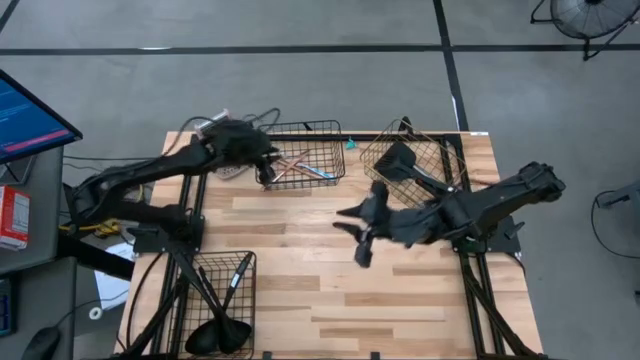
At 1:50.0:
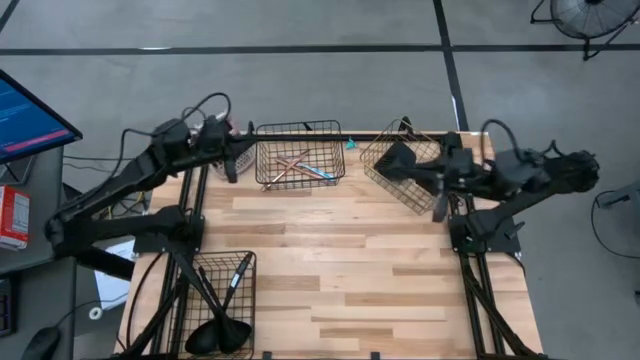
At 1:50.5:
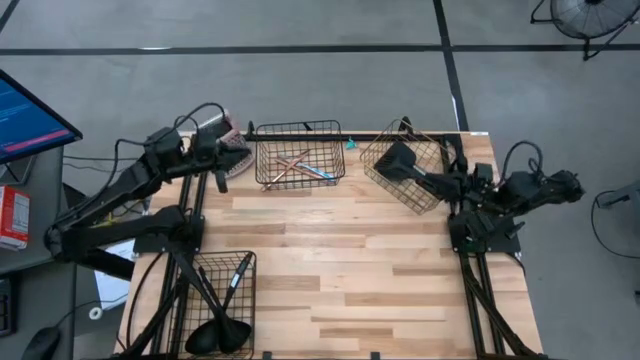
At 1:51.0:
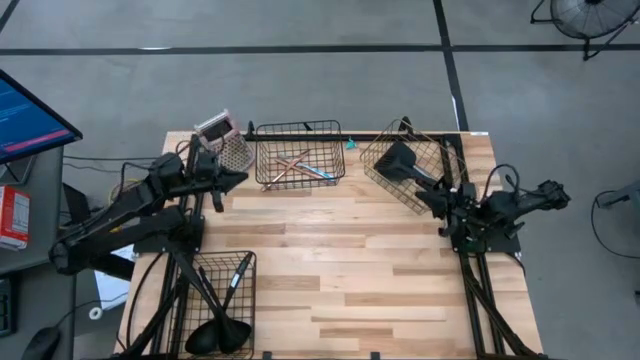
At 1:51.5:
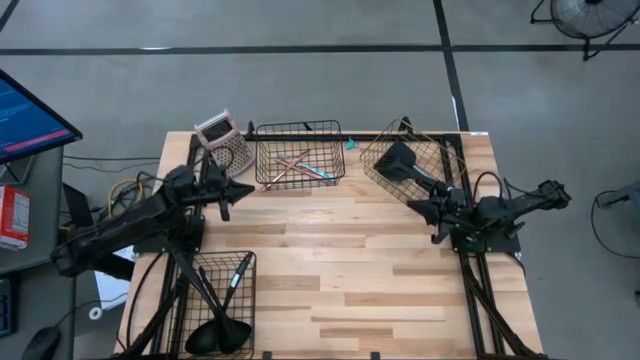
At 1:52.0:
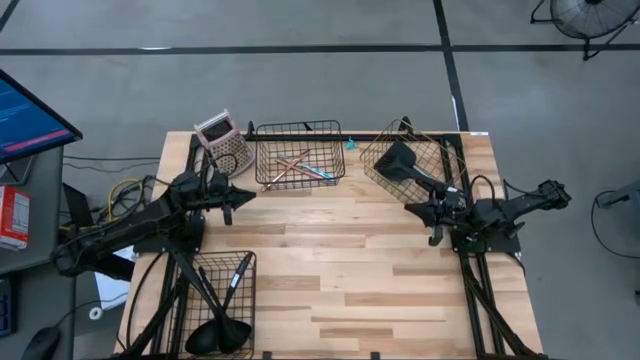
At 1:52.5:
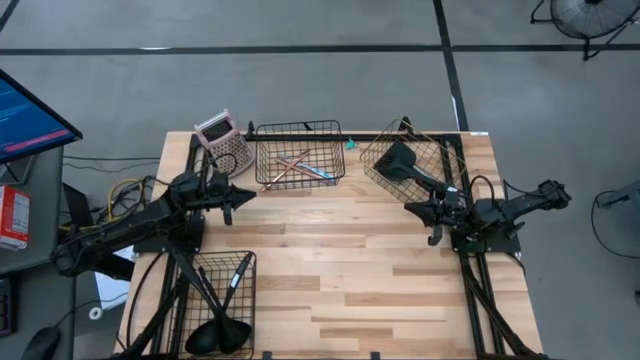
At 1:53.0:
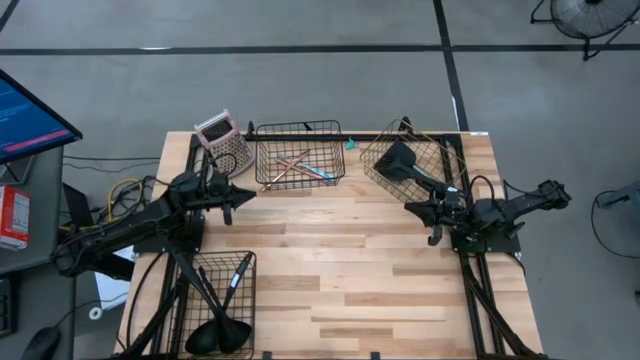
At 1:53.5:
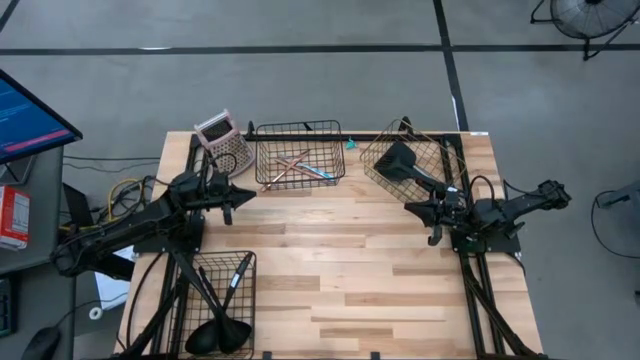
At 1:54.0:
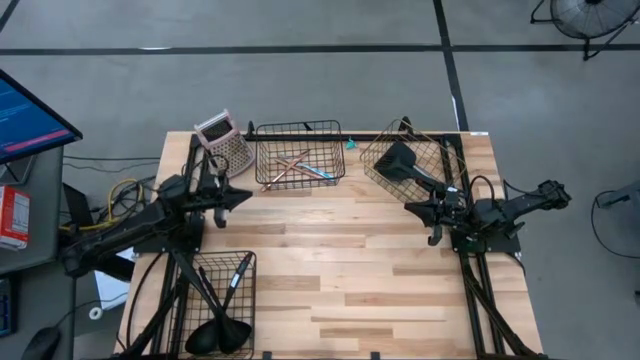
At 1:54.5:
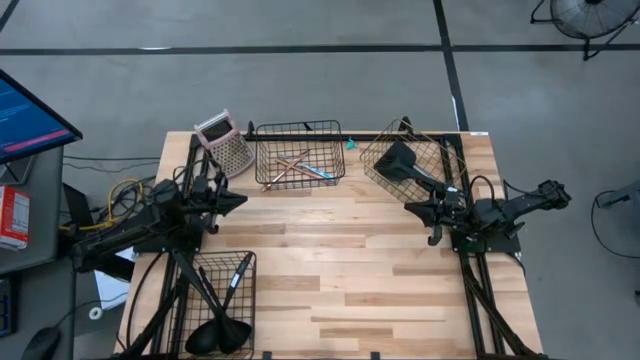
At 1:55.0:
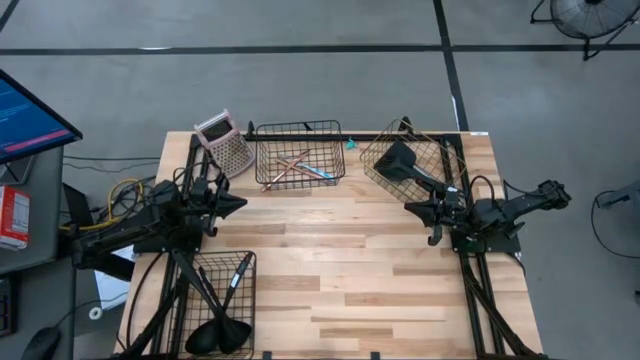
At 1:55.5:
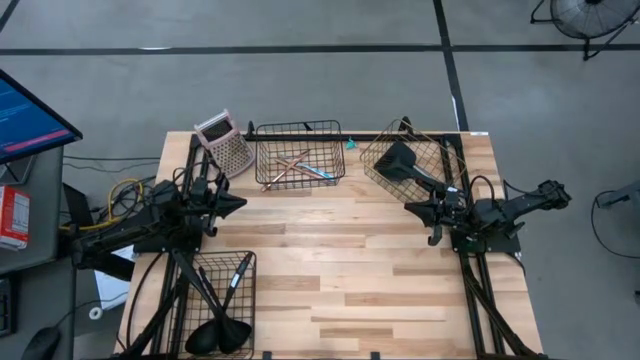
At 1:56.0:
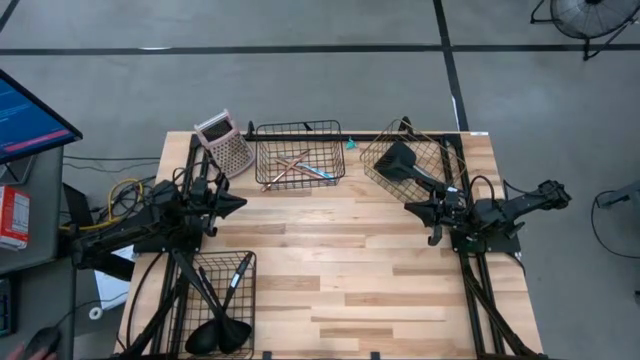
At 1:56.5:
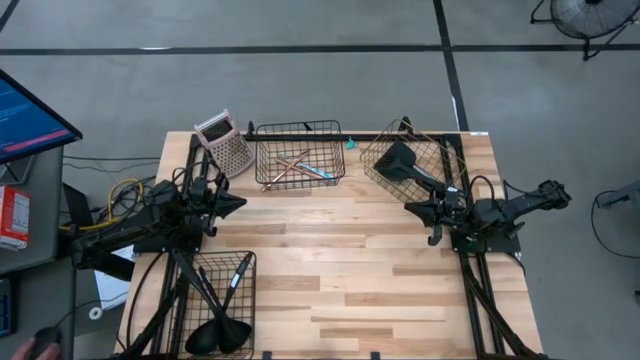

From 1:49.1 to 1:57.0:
Task: Pick & Place Kitchen Items
Return to Home Position

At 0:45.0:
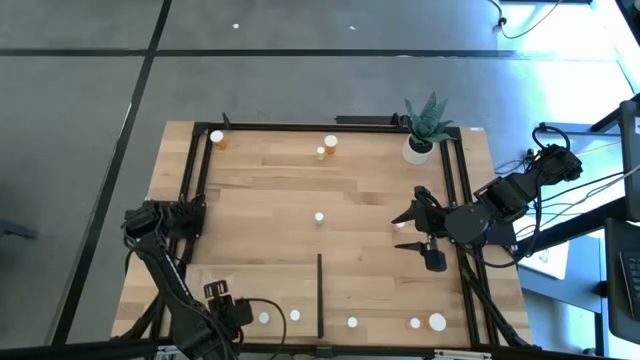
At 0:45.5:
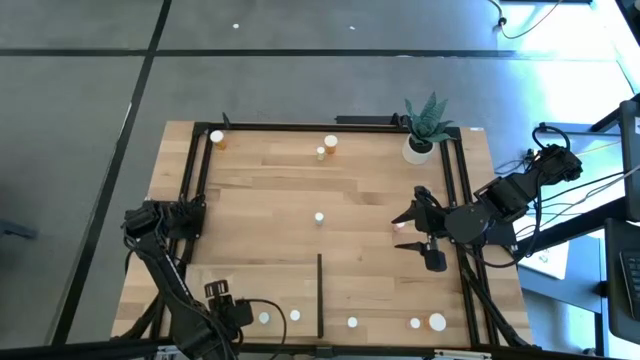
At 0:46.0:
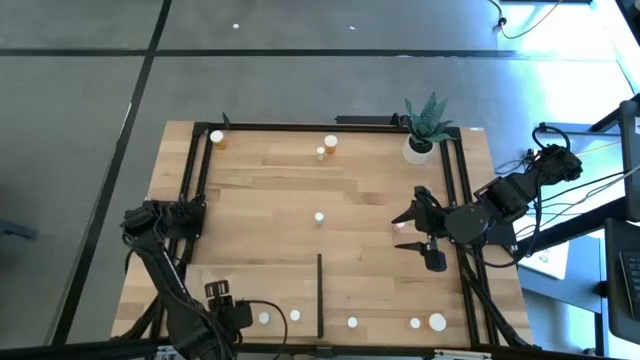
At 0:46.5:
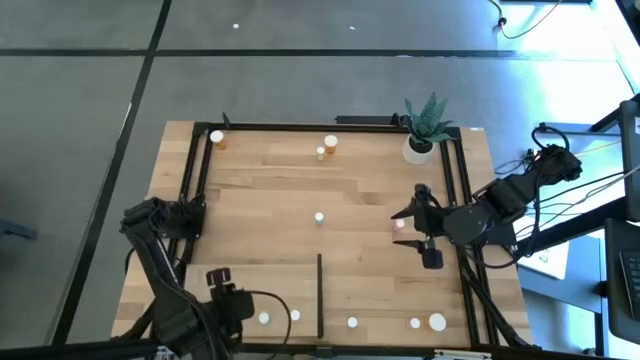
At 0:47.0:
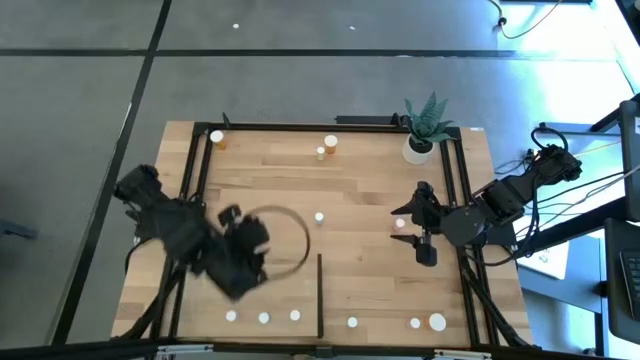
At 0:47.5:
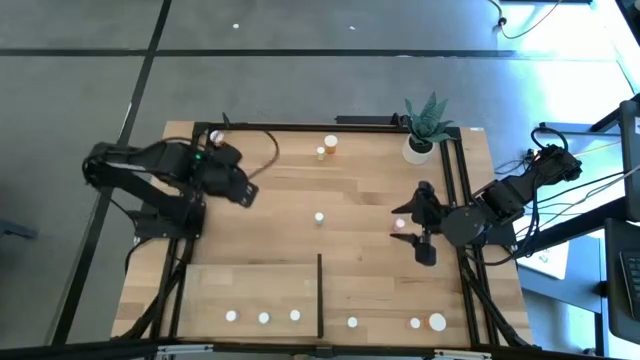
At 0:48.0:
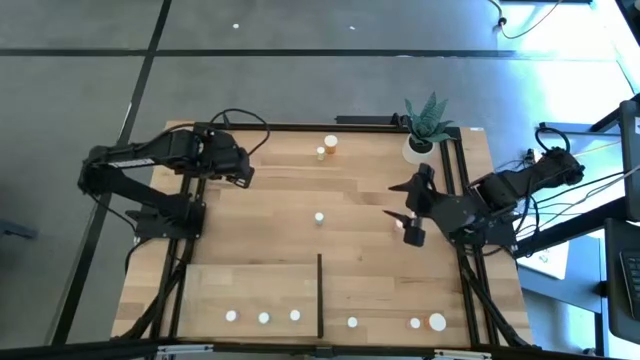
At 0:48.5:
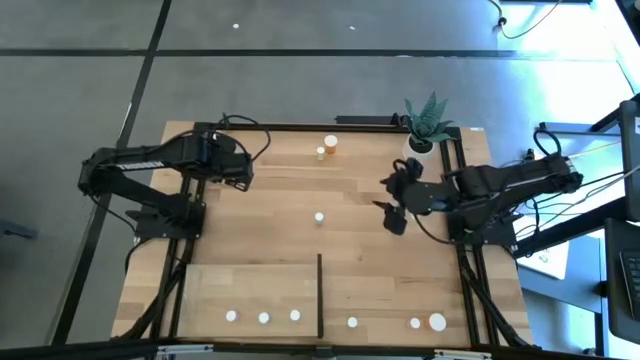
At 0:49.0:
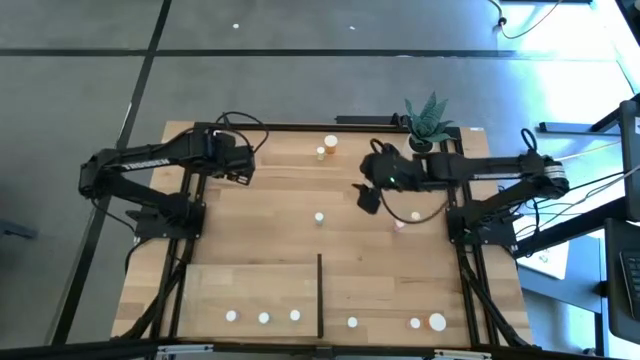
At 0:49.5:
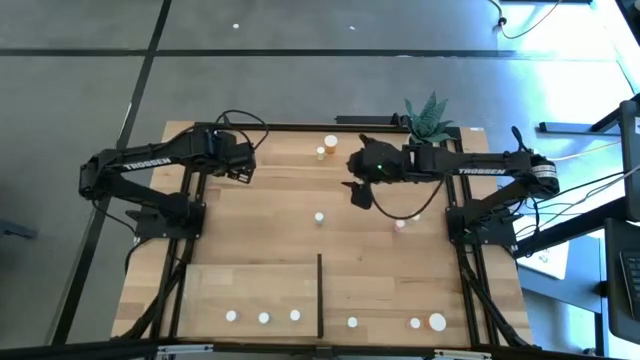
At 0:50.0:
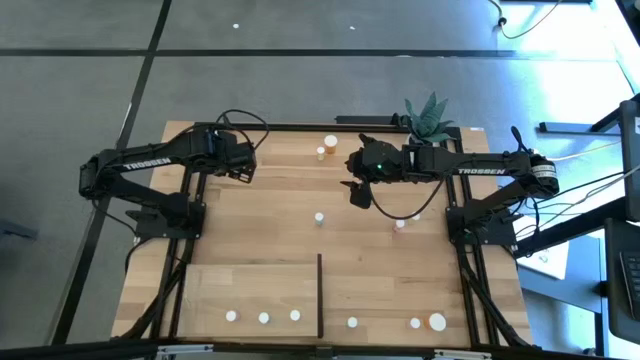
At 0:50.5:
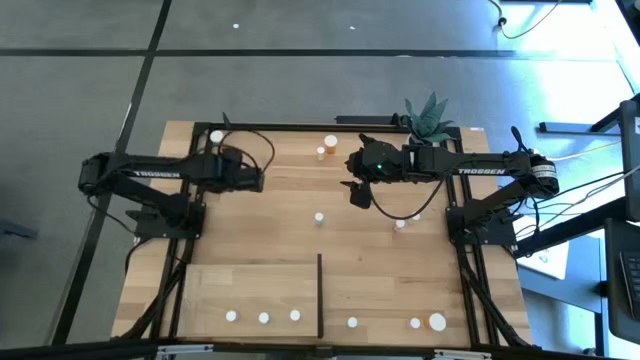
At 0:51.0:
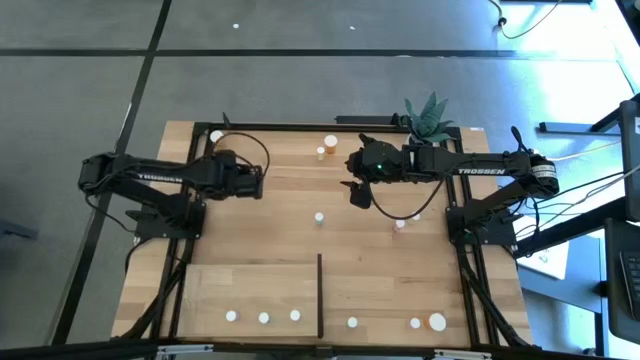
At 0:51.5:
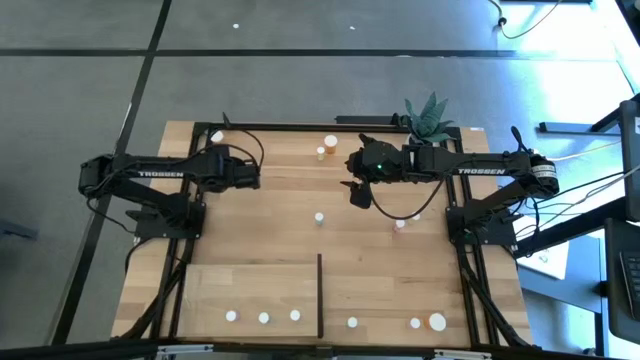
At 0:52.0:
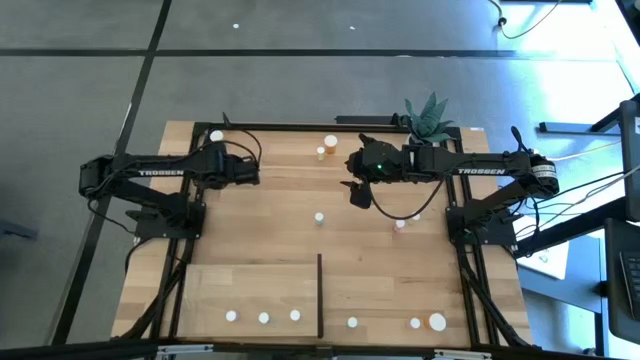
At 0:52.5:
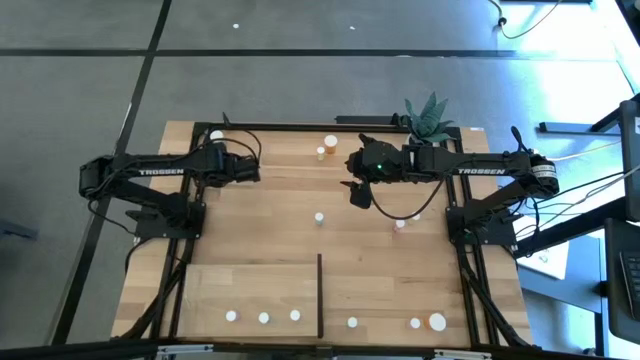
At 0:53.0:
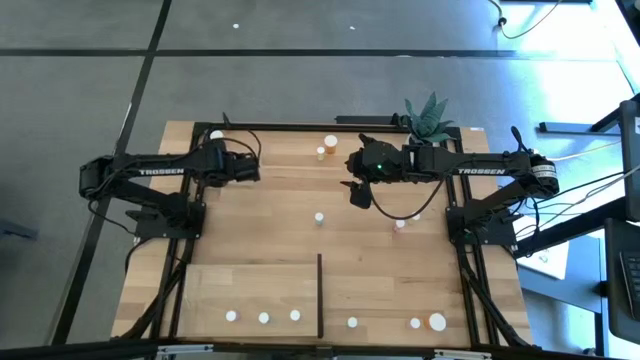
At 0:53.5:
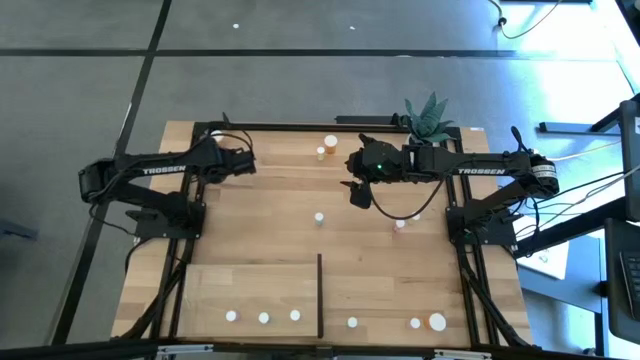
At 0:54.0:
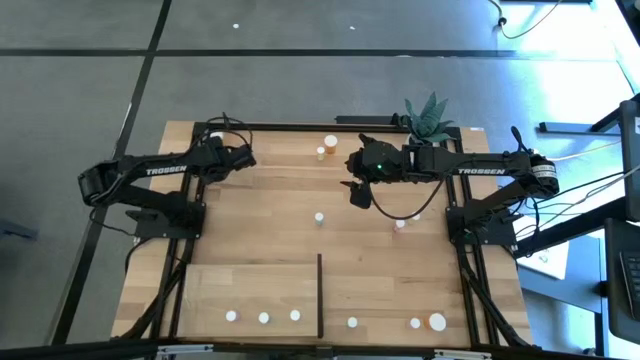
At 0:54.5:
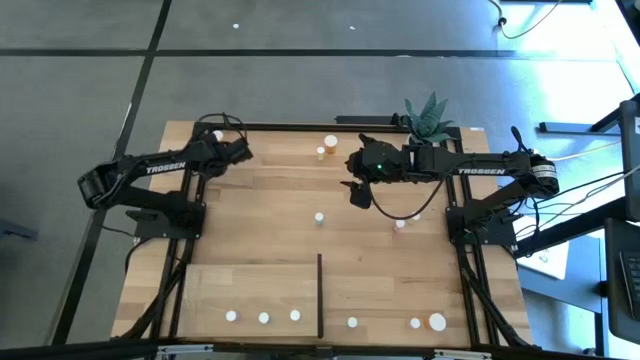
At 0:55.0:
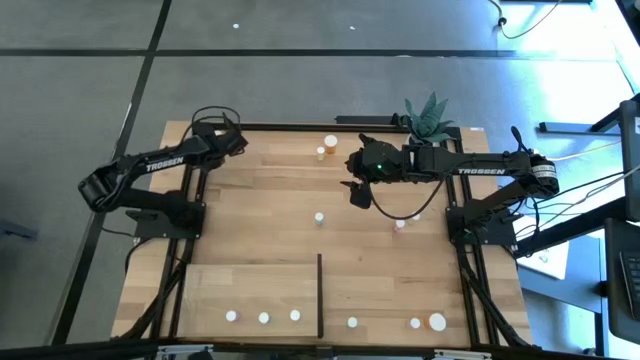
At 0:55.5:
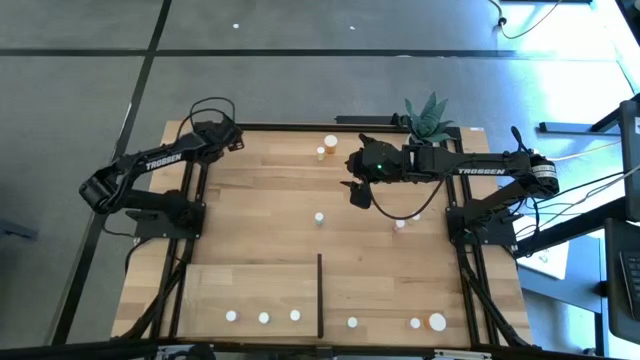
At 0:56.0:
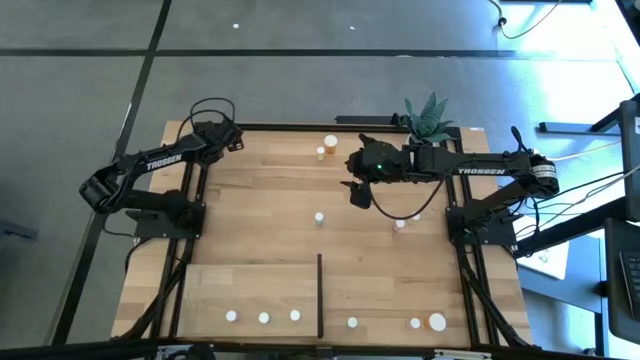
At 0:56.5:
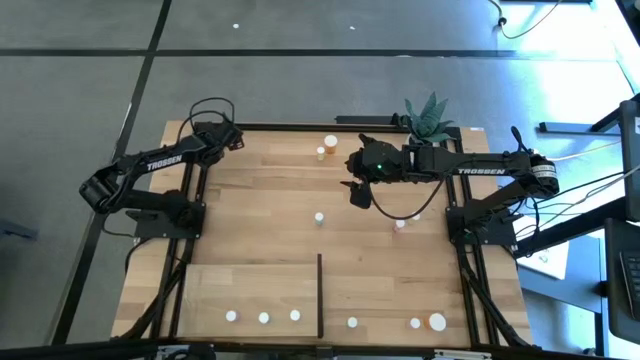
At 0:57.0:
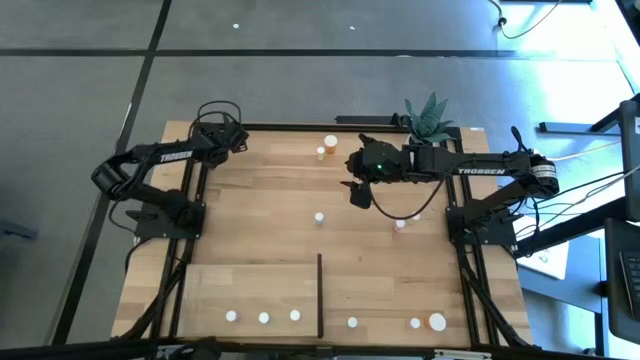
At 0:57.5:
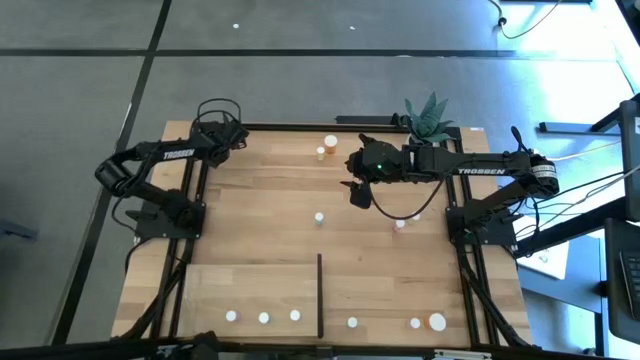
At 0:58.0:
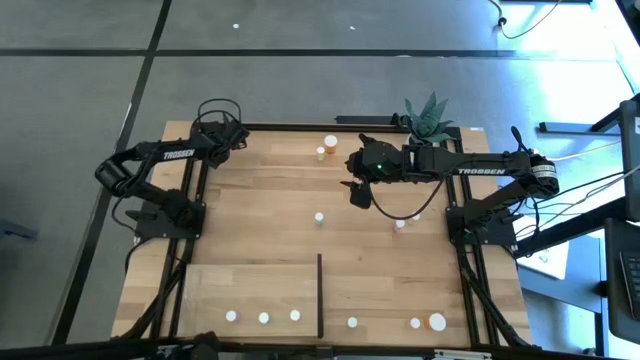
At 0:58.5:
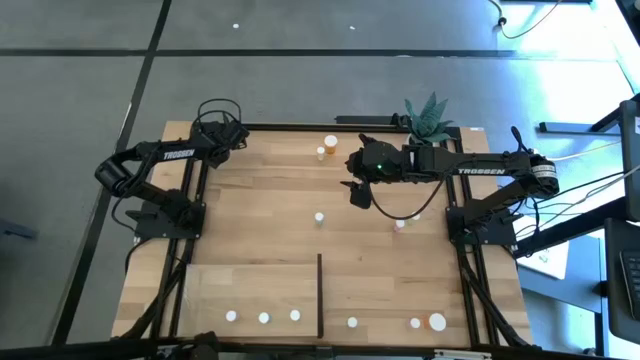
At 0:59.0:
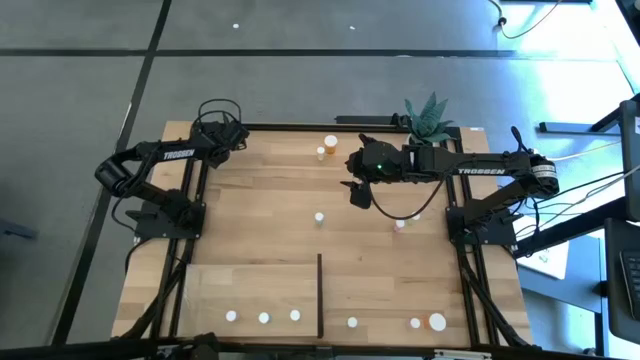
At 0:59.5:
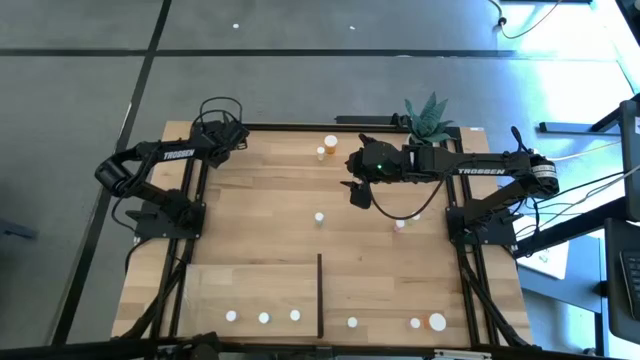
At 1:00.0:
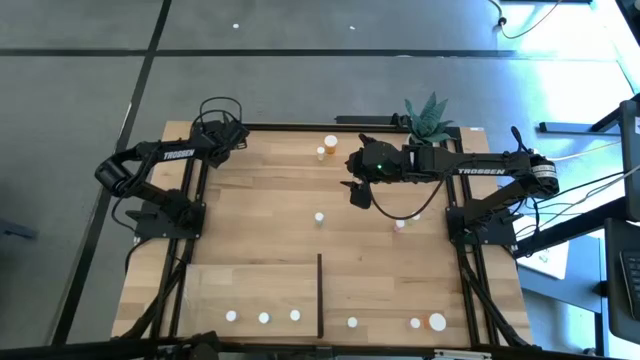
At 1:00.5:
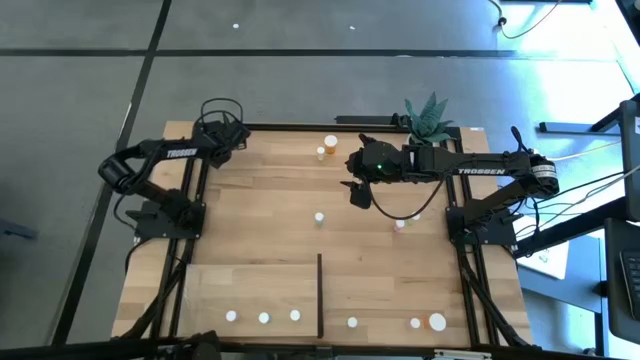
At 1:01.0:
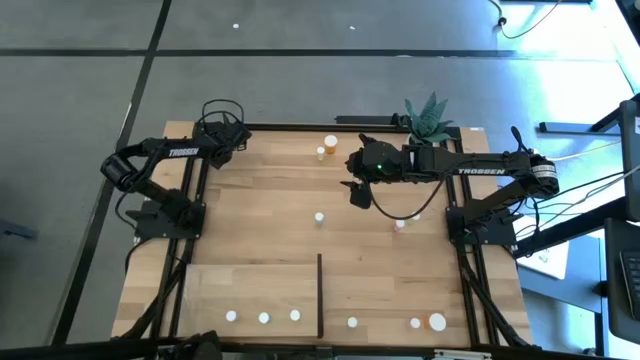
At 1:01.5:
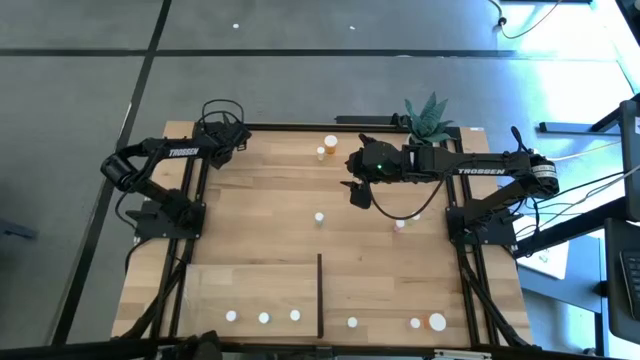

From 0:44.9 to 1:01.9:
Task: Pick and place medicine bottles onto shelf by color
Put the top left orange pill bottle on the shelf
